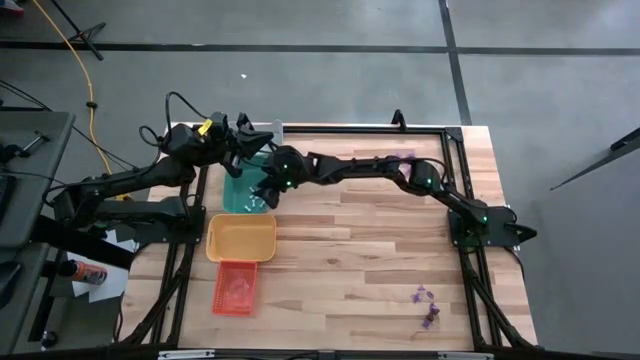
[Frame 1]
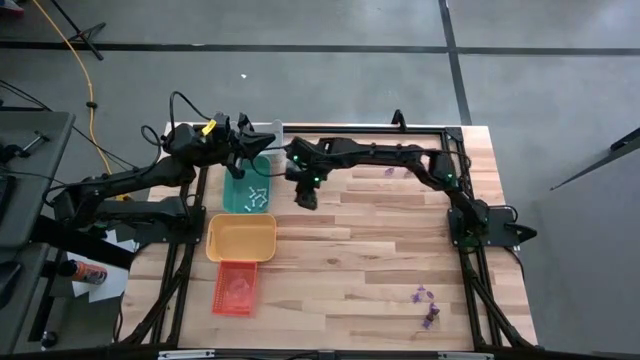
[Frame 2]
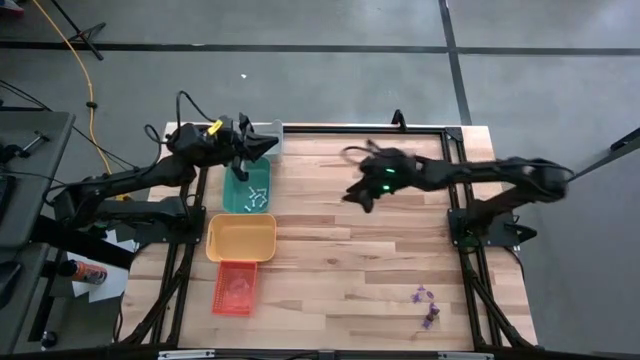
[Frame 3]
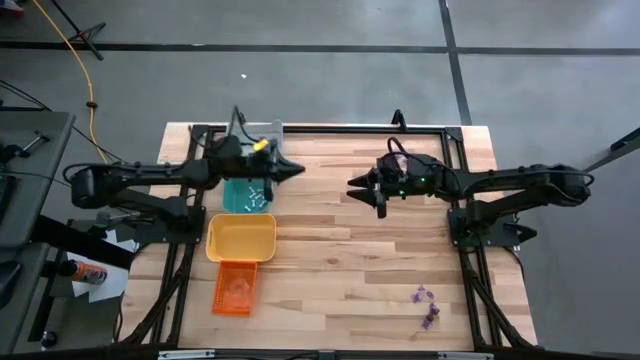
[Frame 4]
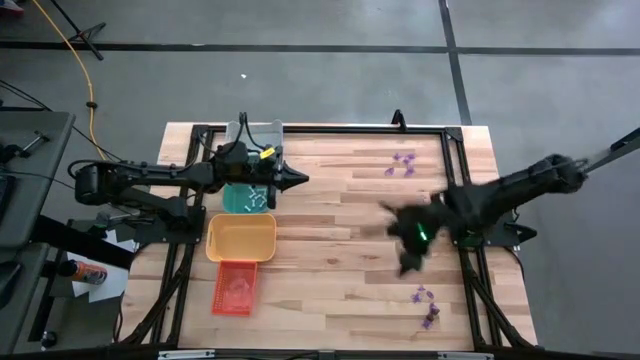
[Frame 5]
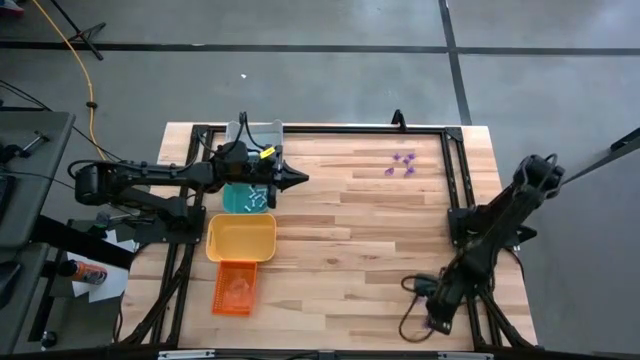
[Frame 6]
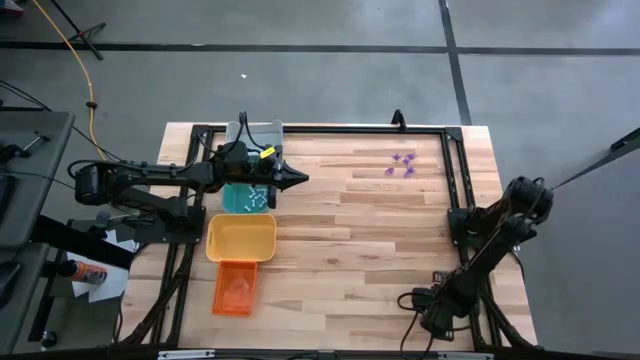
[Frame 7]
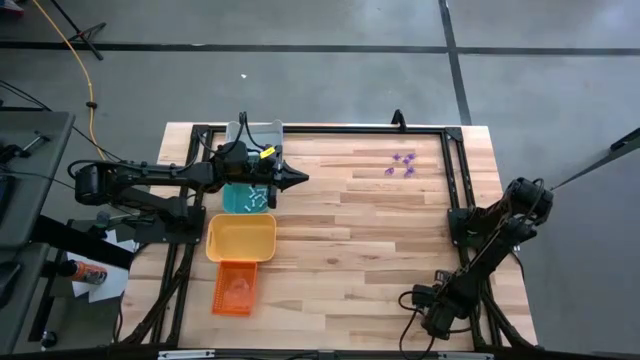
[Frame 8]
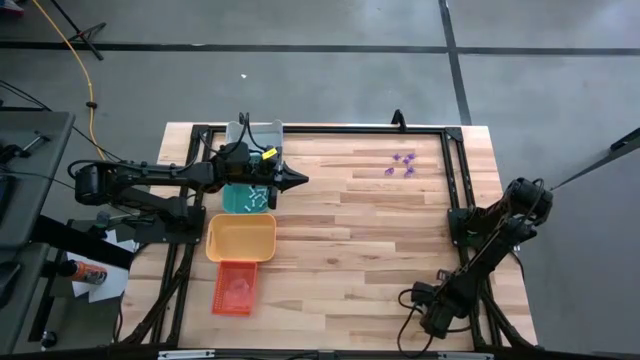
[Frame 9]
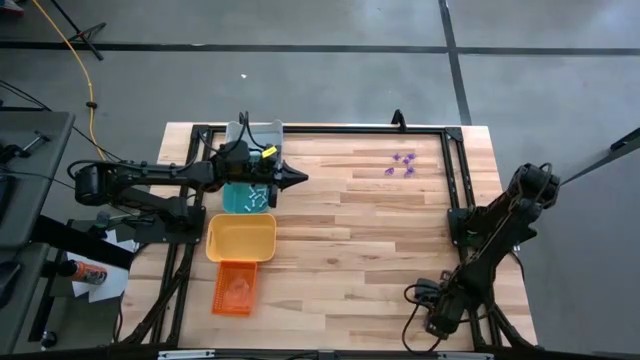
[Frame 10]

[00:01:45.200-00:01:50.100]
Task: Sort Halloween decoration
Put the black skull toy in the white bin

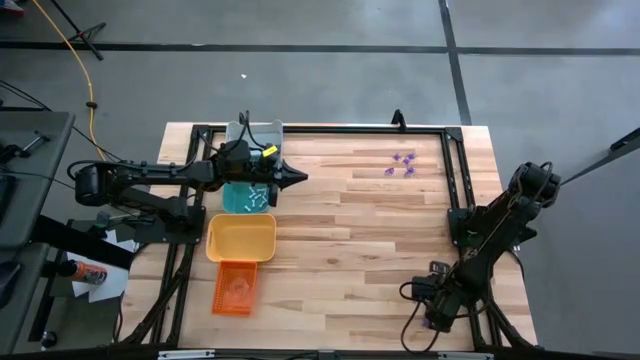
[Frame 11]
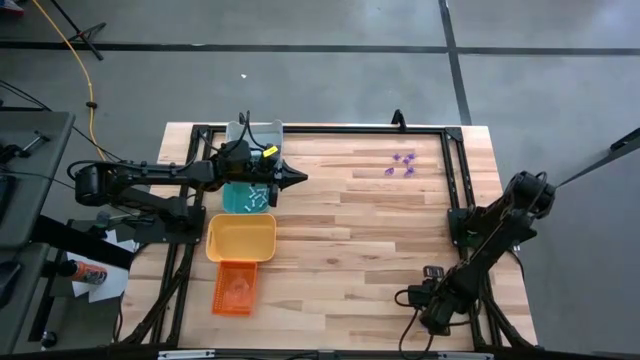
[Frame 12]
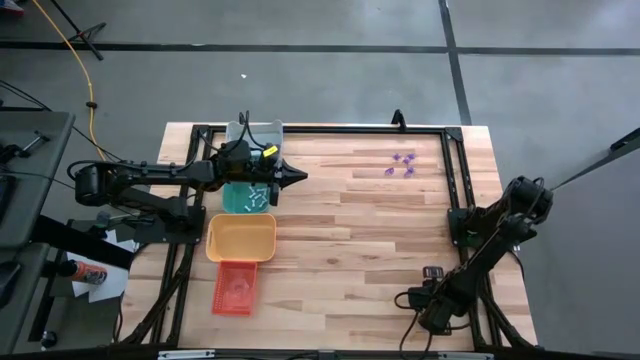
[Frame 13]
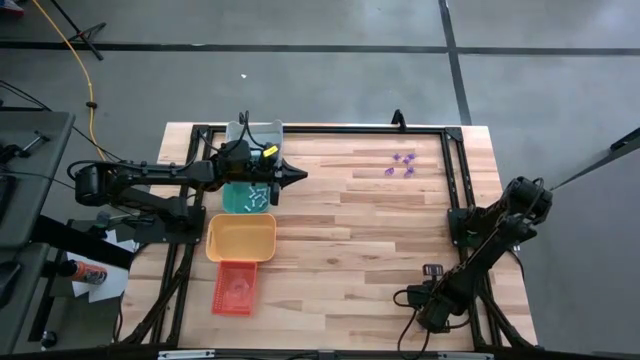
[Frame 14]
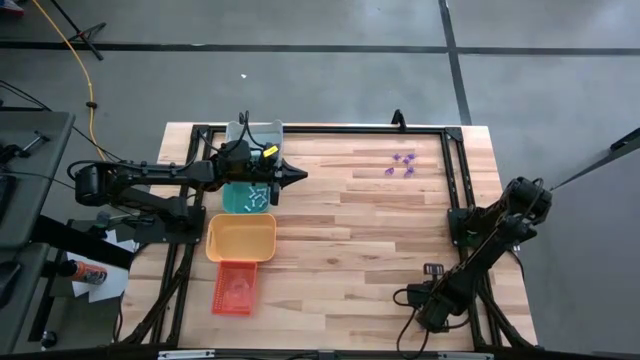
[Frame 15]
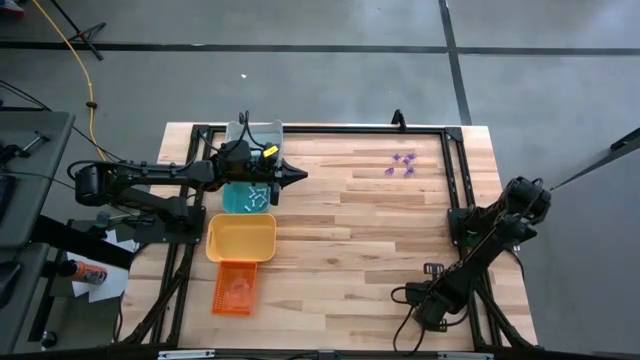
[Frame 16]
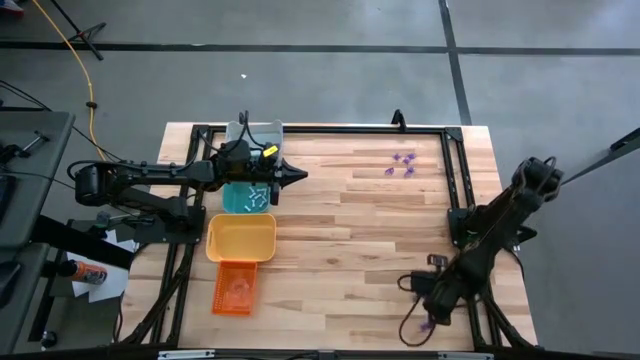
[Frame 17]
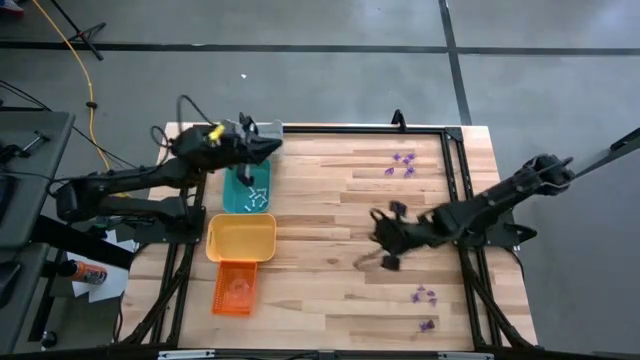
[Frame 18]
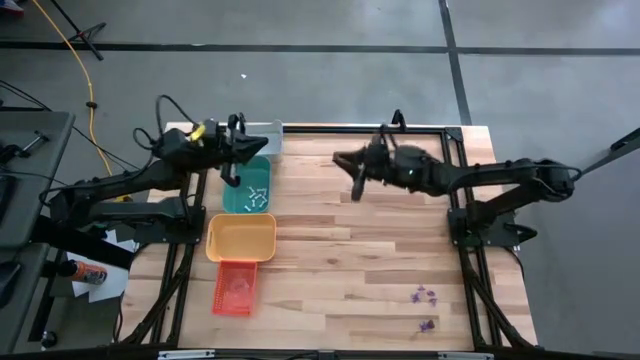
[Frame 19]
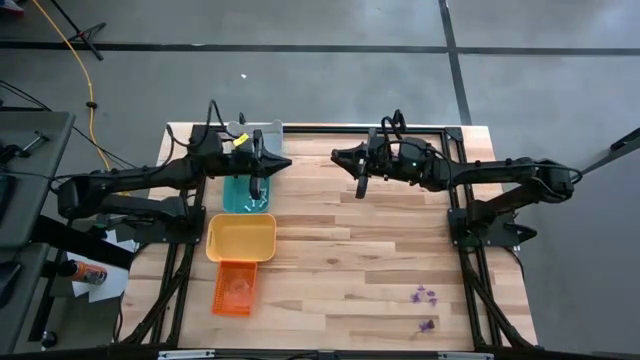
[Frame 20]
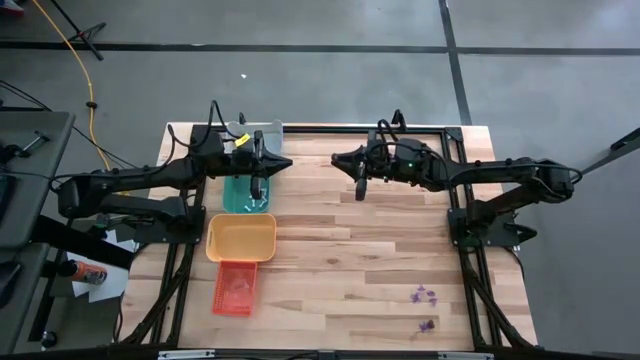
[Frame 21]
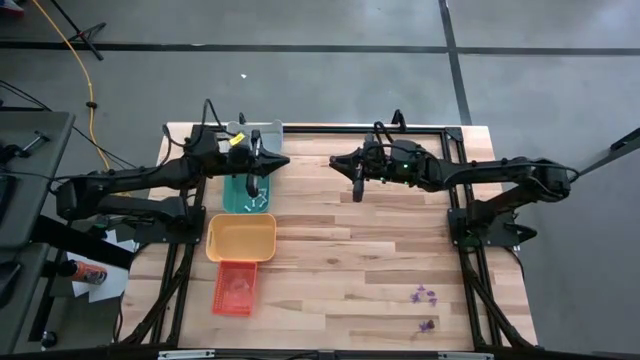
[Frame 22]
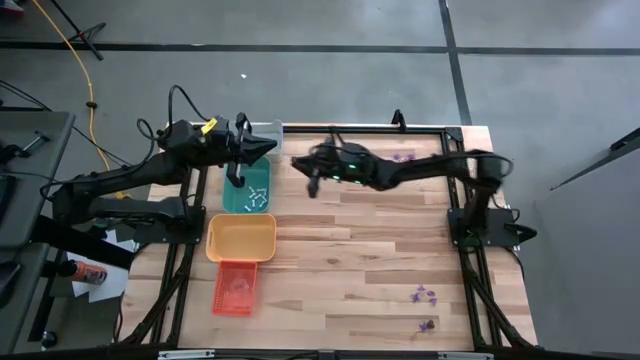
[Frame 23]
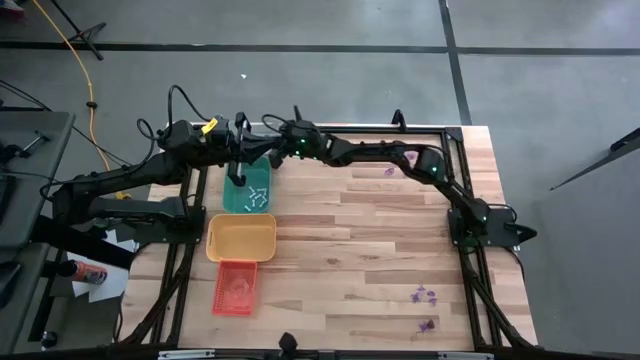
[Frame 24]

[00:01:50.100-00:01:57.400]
Put the black skull toy in the white bin

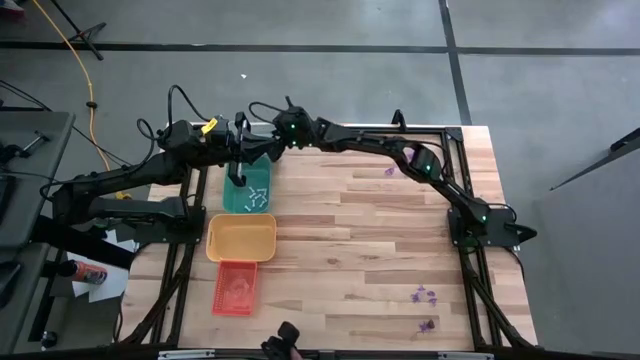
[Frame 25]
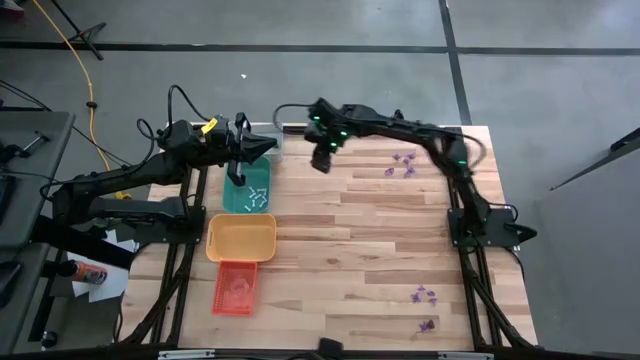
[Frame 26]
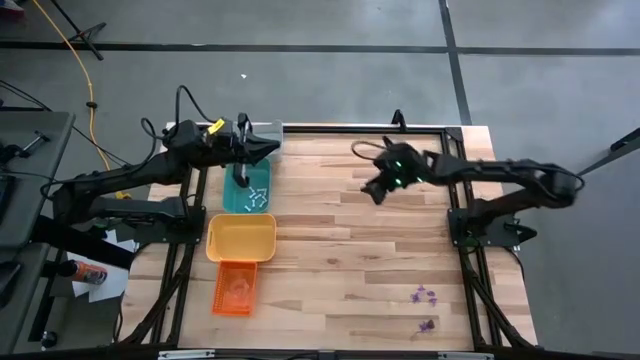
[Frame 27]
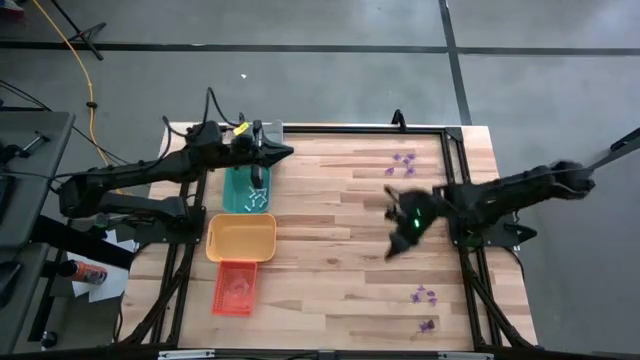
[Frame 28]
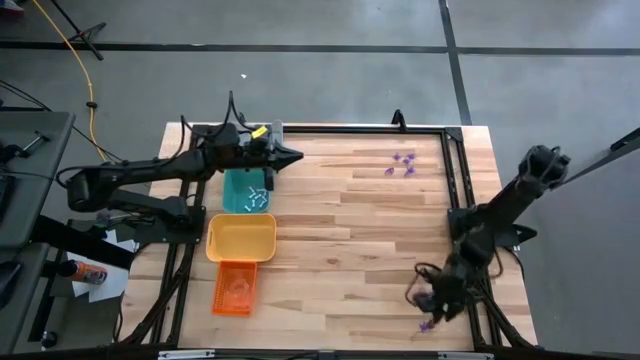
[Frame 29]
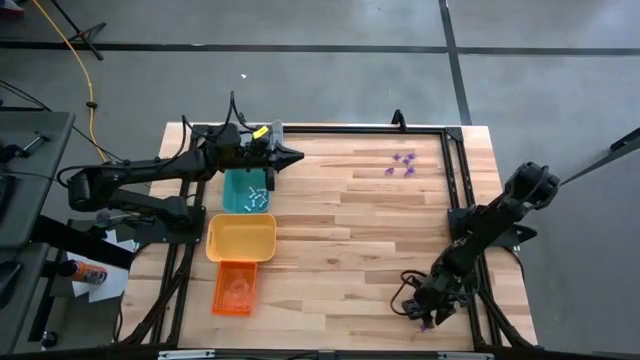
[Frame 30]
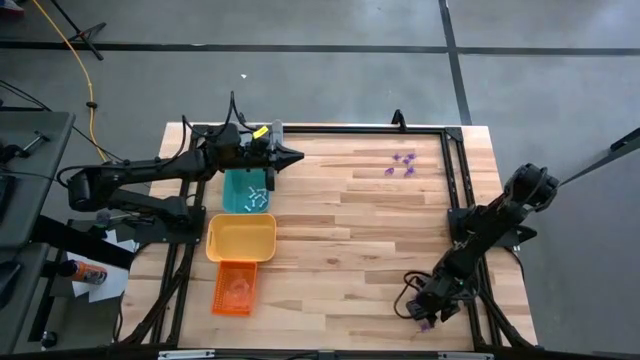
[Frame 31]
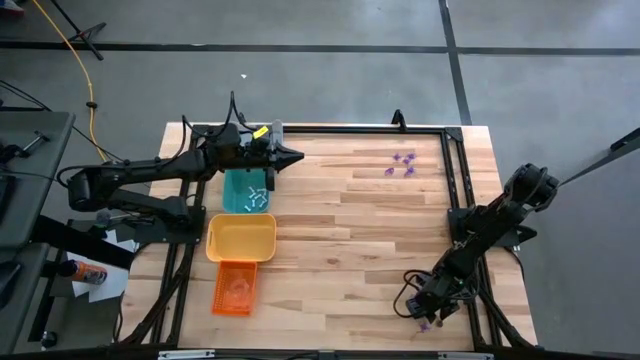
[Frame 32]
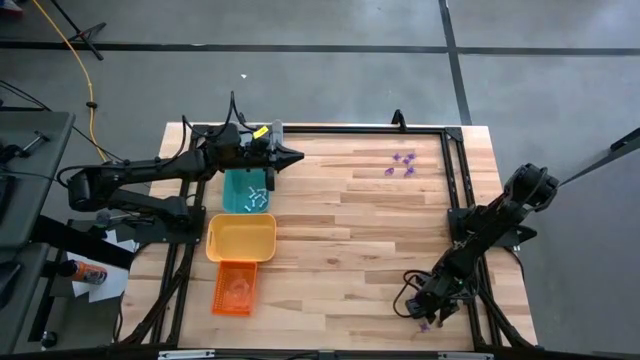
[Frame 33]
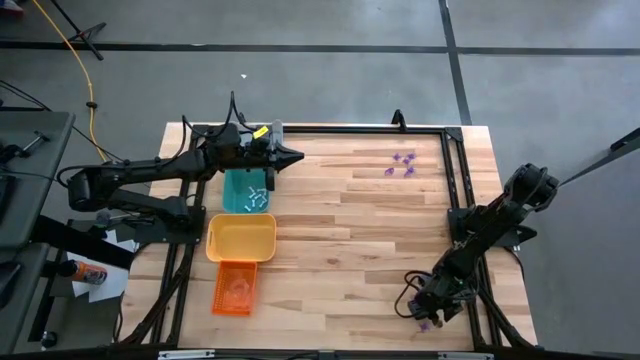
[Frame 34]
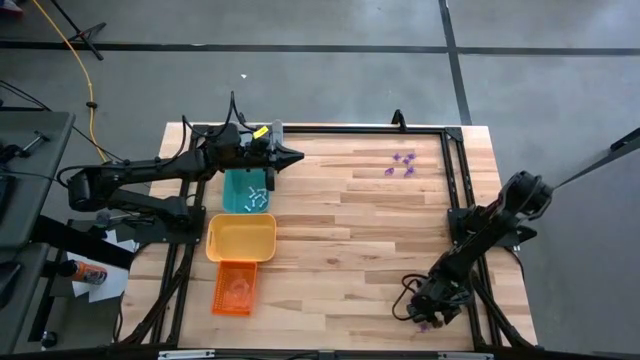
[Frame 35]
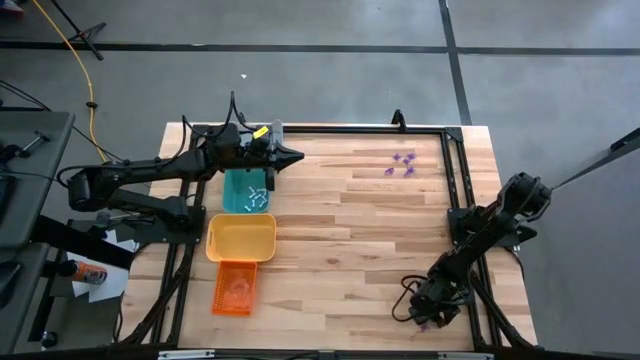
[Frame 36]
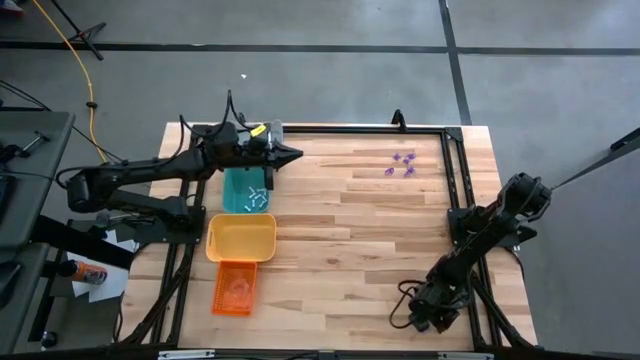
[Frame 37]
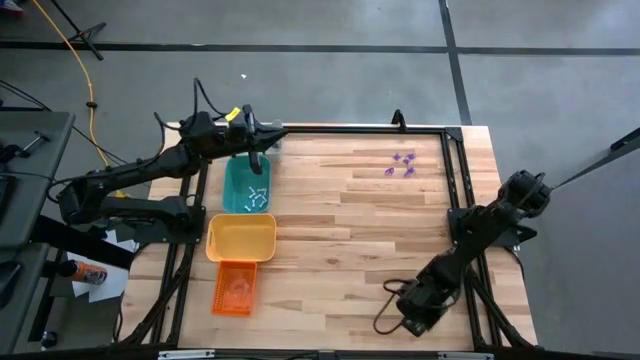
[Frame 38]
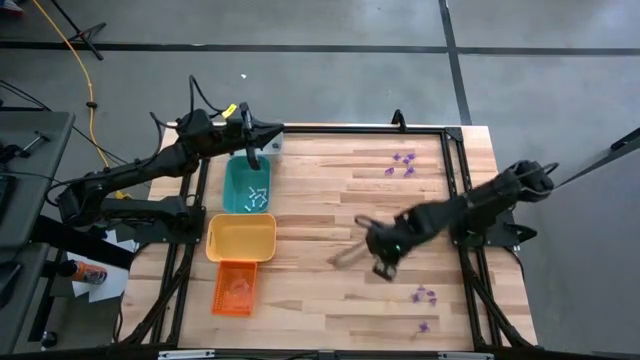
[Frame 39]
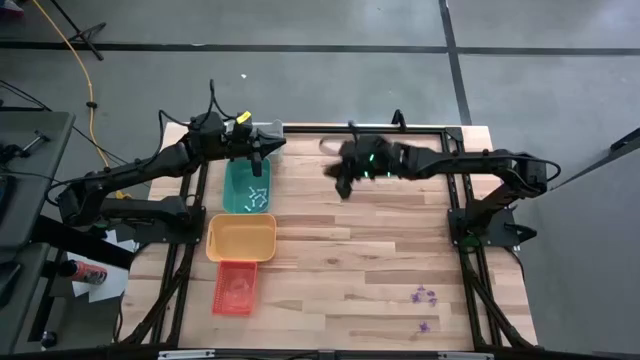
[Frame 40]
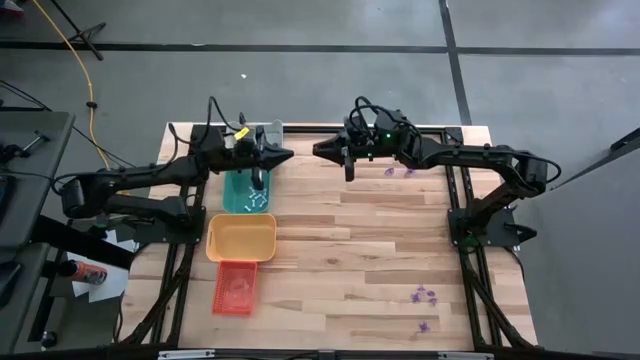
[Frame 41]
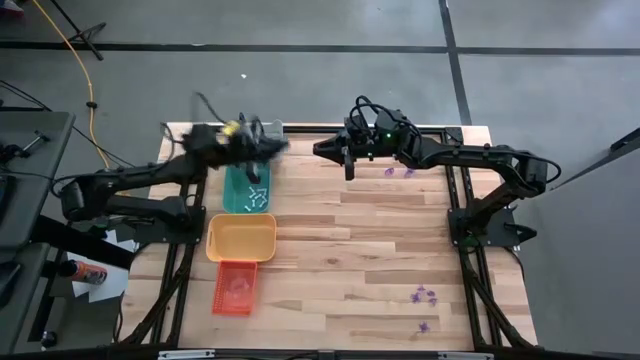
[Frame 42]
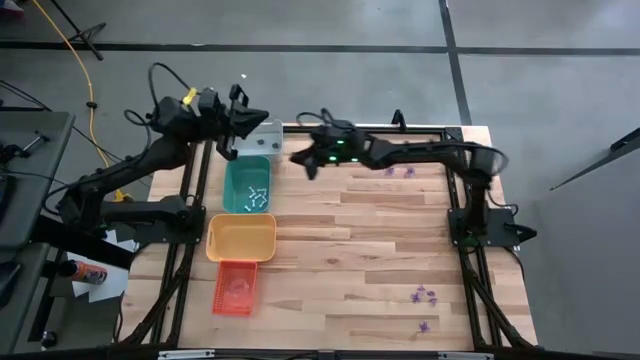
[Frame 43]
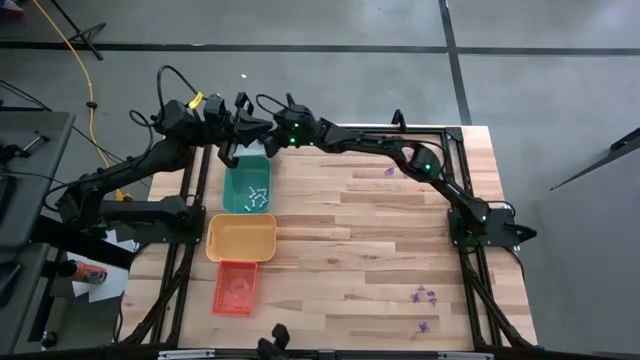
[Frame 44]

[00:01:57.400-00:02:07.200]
Put the black skull toy in the white bin
